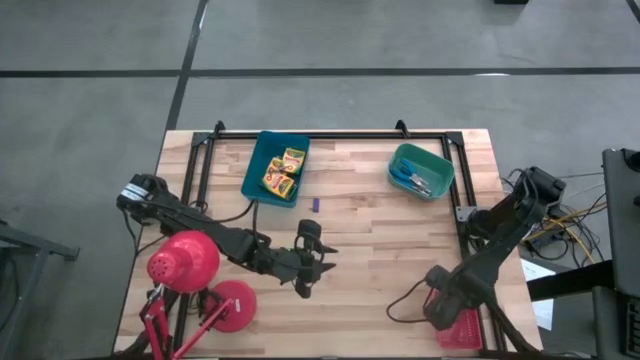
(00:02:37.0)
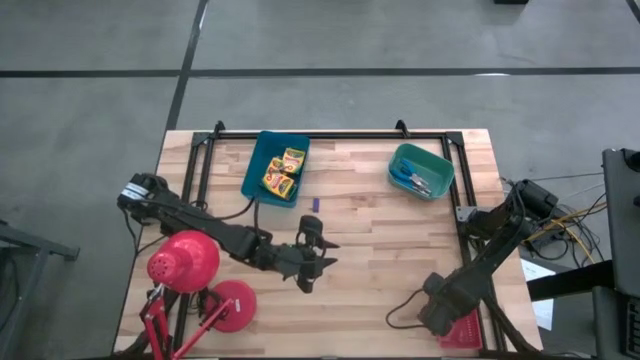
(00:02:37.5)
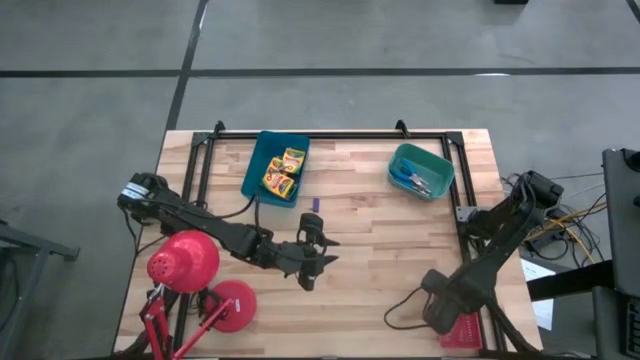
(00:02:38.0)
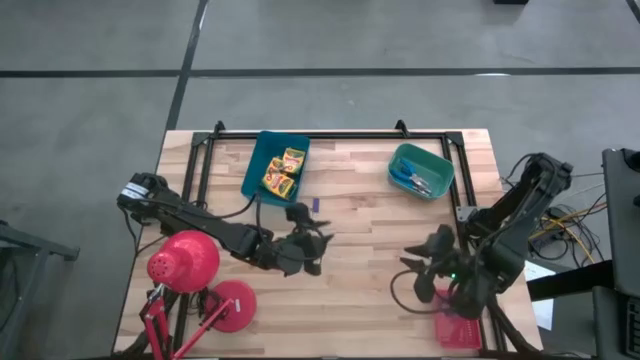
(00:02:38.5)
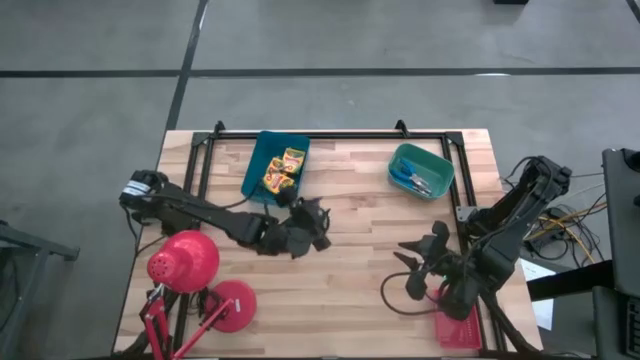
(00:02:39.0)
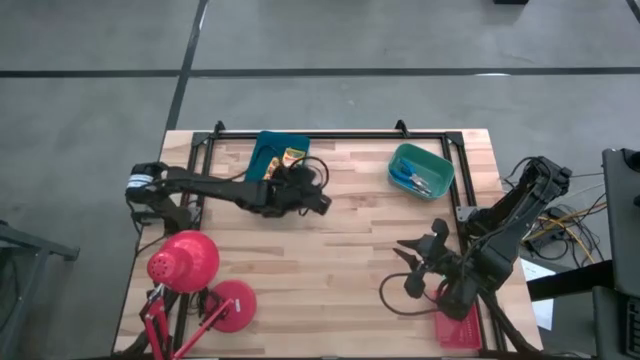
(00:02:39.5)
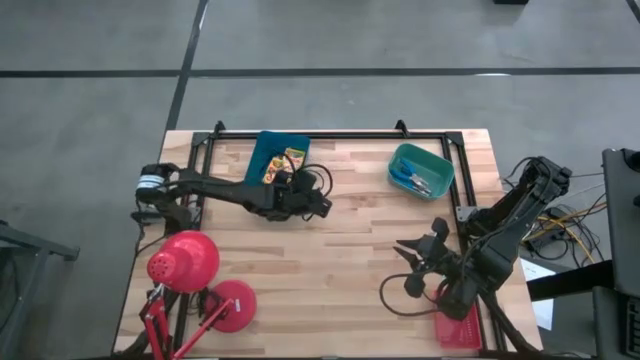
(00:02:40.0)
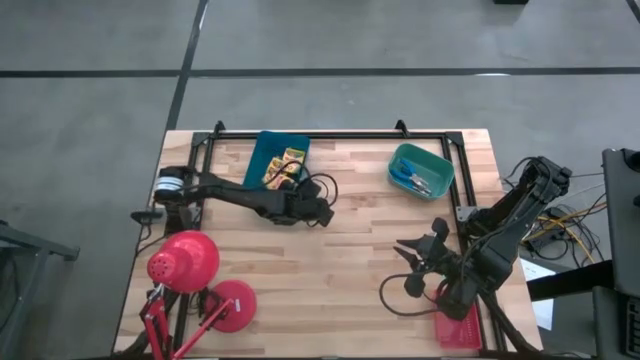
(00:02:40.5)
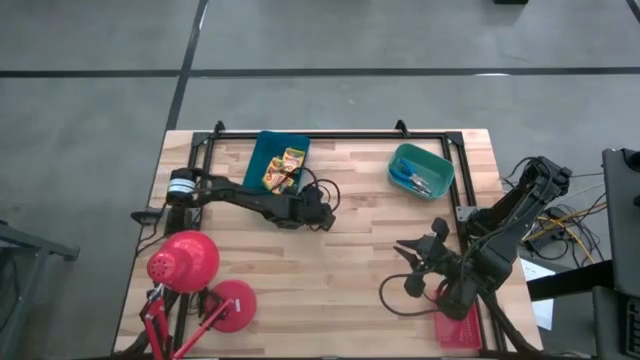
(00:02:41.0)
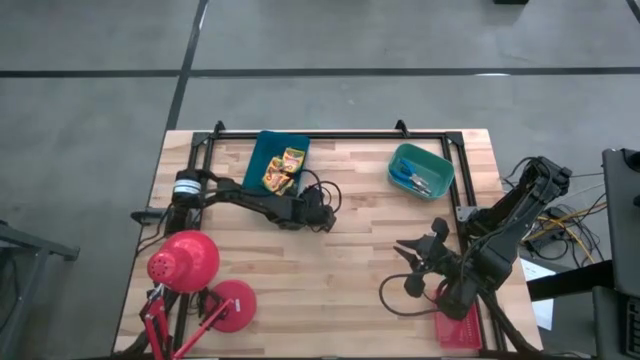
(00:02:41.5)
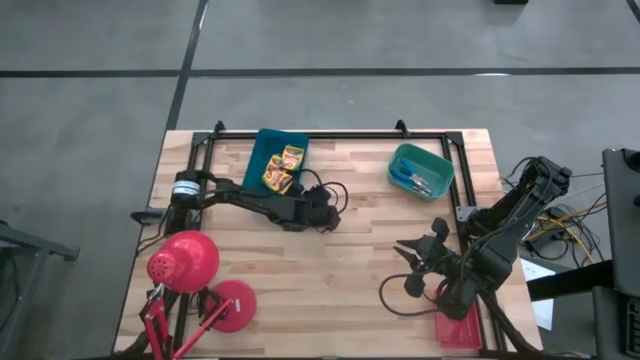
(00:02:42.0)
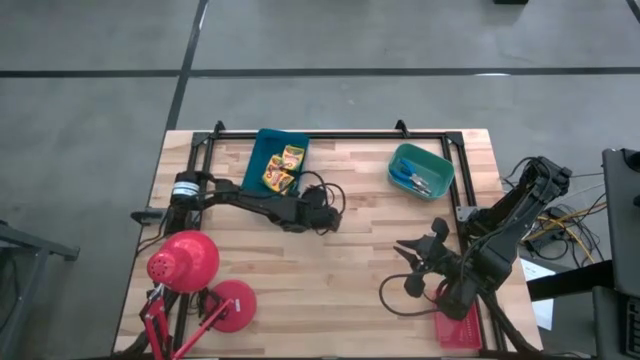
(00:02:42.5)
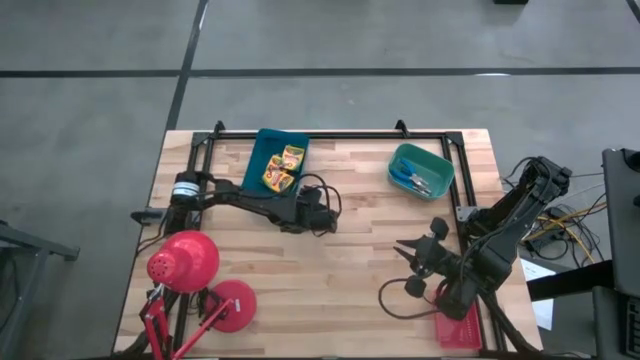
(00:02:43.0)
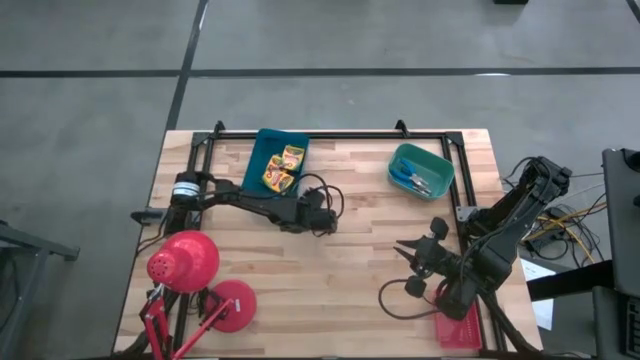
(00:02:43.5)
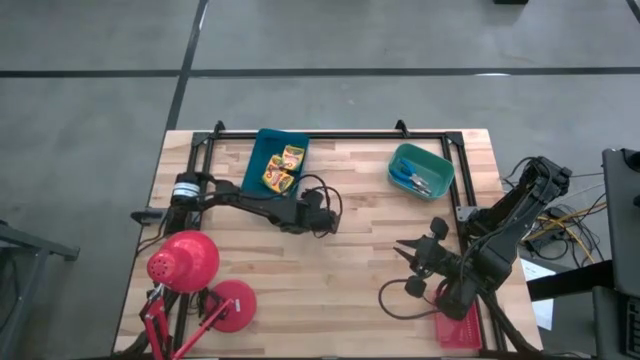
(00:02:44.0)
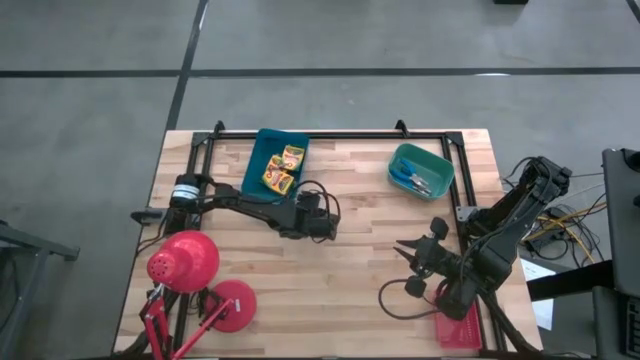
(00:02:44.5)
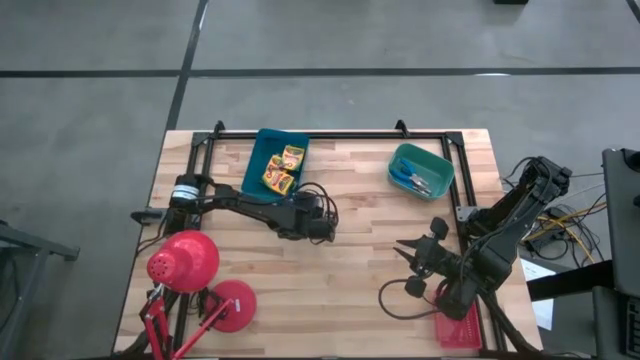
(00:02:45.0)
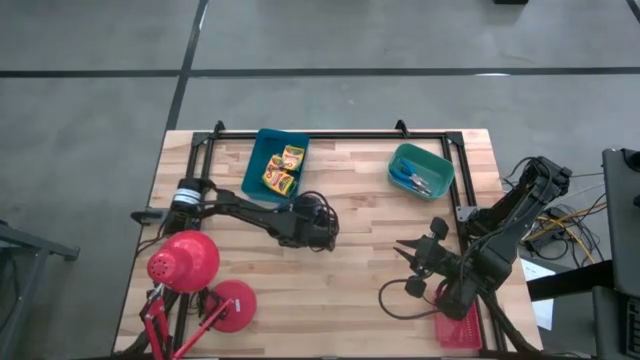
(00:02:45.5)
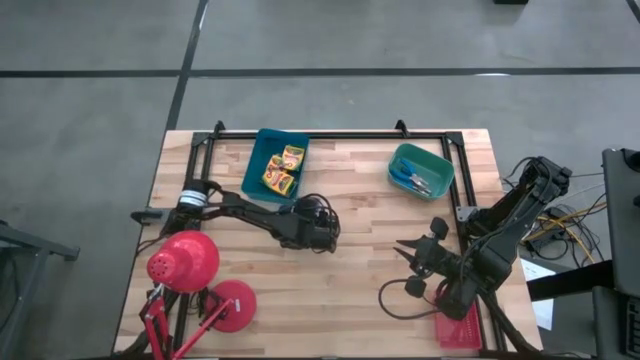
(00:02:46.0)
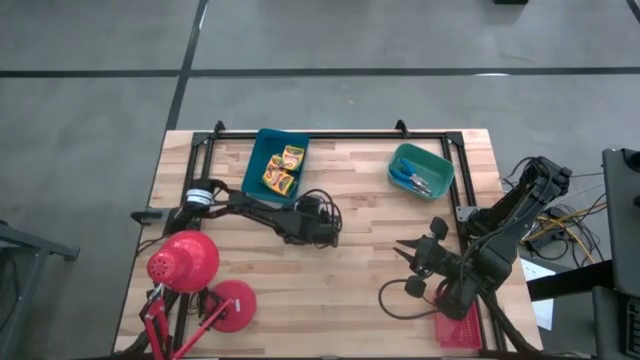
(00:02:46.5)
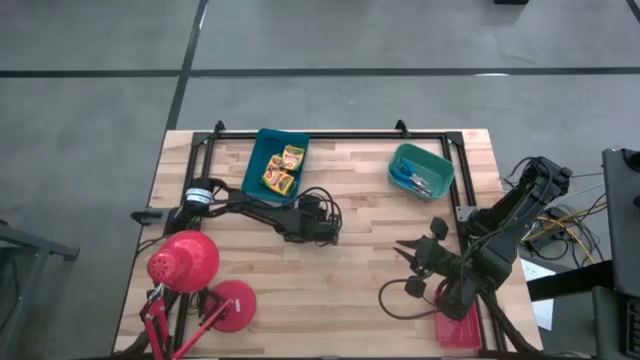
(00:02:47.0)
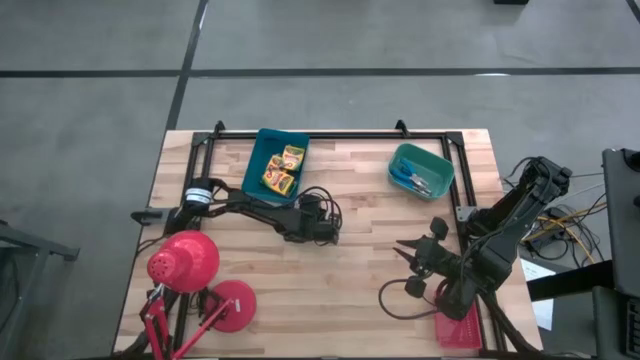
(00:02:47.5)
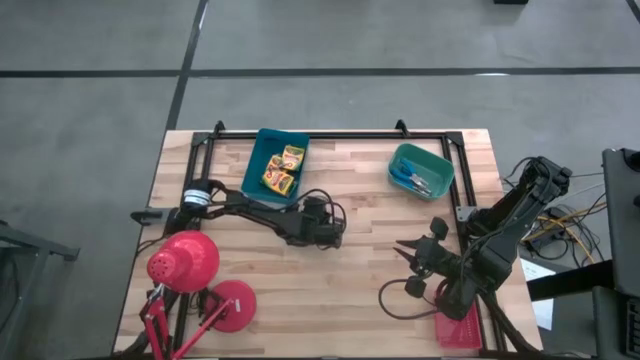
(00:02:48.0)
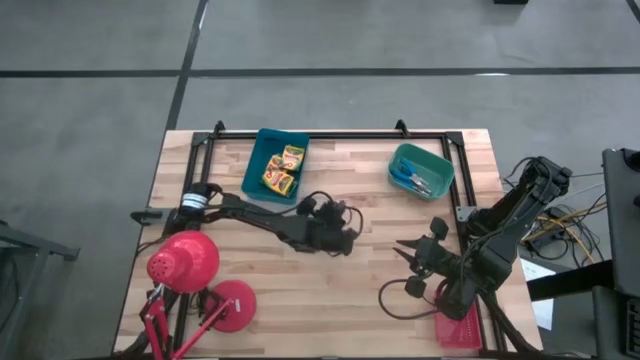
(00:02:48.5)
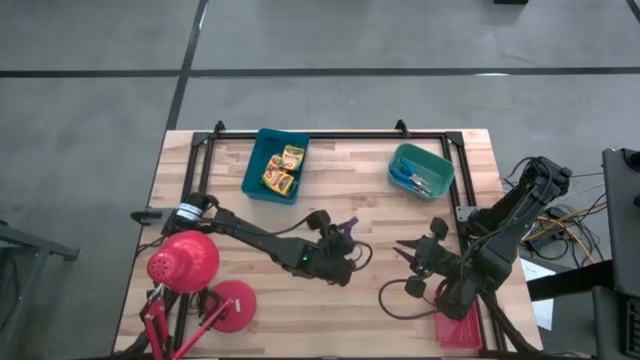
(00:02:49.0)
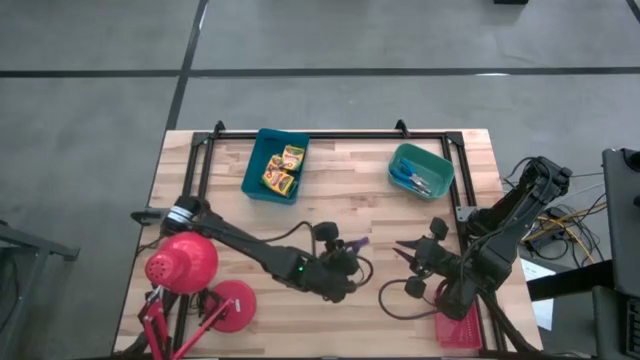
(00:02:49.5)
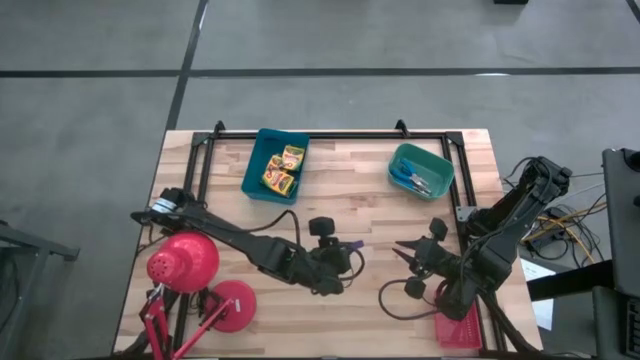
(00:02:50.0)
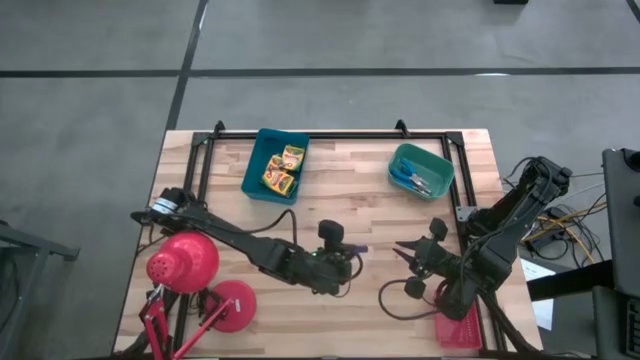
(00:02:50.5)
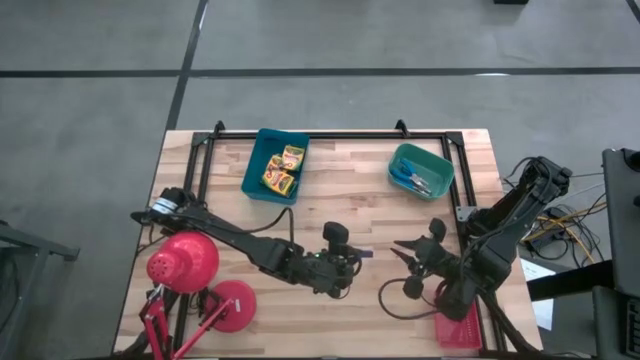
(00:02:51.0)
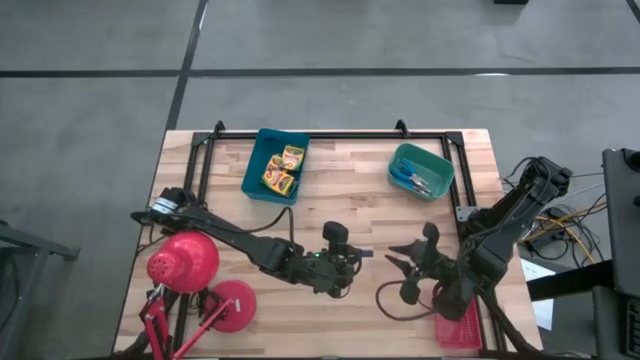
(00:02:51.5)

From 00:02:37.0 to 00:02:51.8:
Task: Pick & Place School Supplies
Put the purple eraser into the red bin

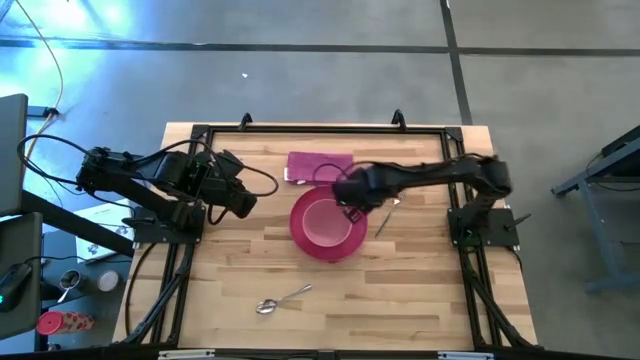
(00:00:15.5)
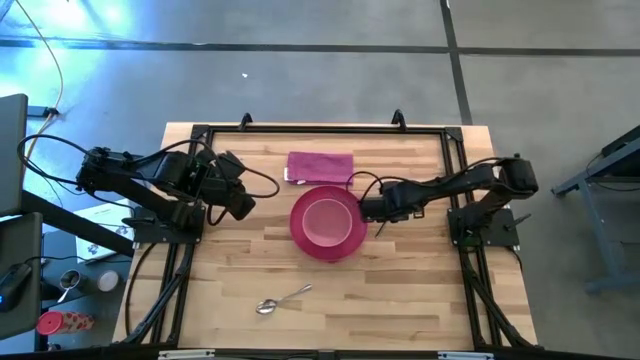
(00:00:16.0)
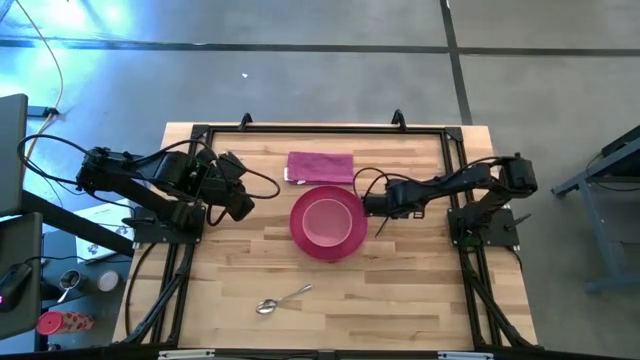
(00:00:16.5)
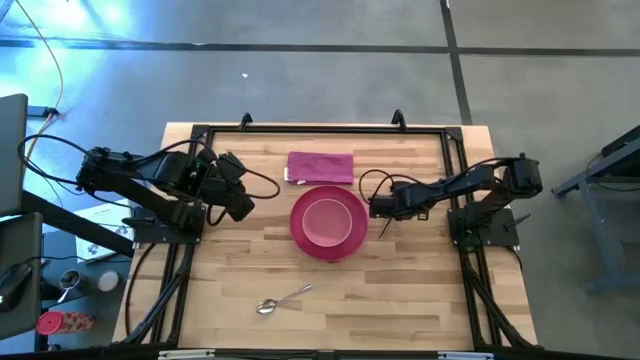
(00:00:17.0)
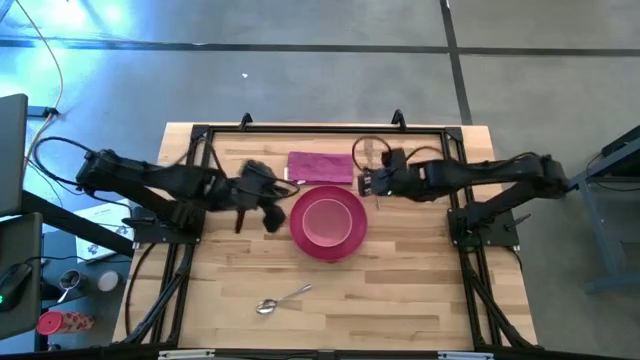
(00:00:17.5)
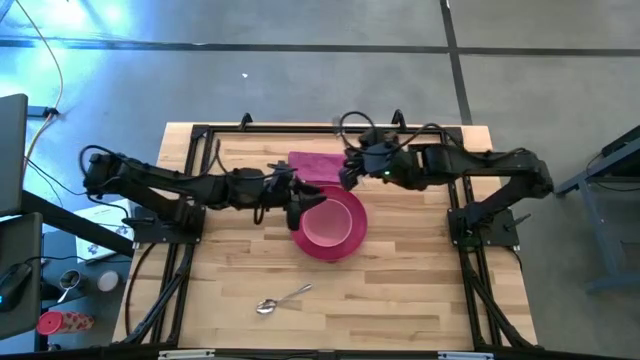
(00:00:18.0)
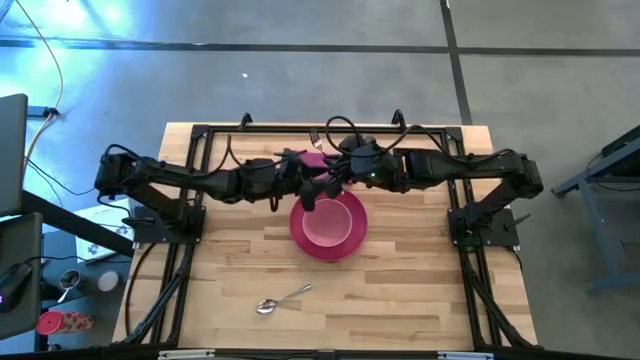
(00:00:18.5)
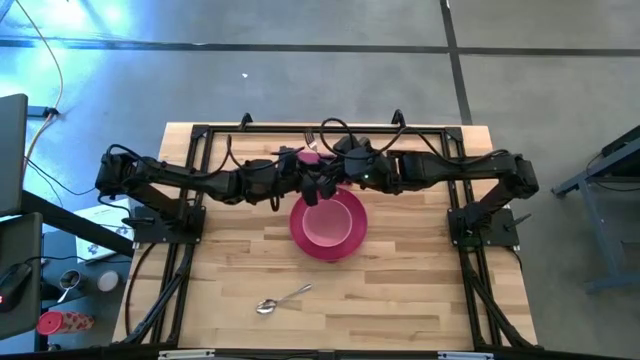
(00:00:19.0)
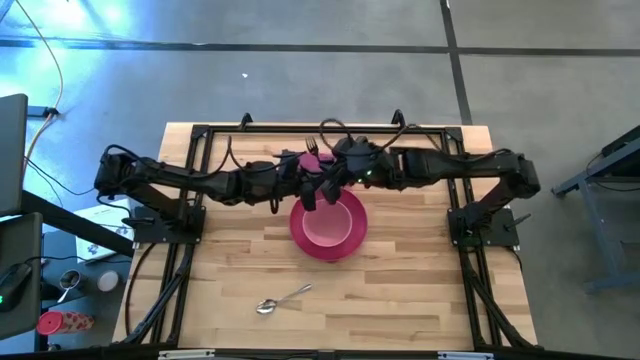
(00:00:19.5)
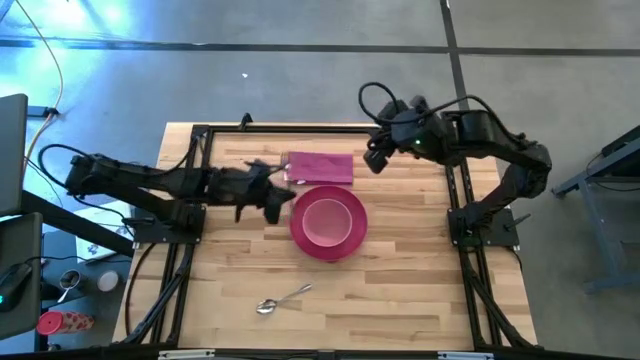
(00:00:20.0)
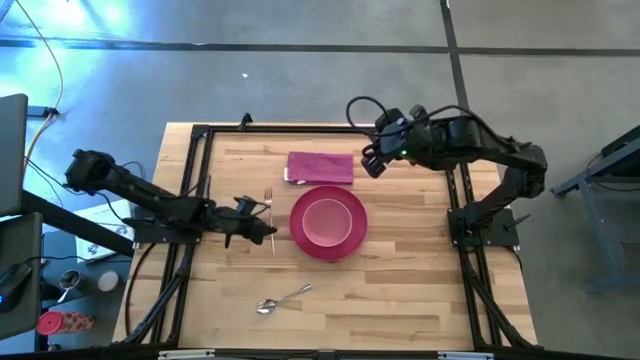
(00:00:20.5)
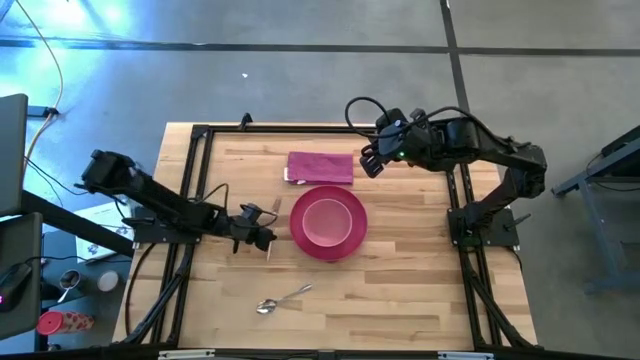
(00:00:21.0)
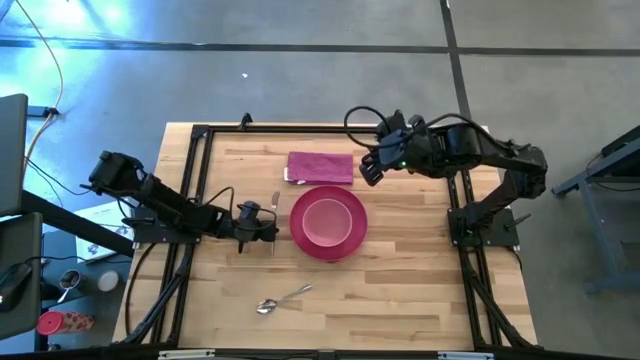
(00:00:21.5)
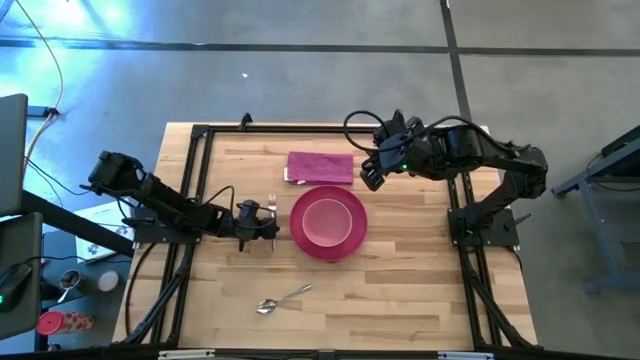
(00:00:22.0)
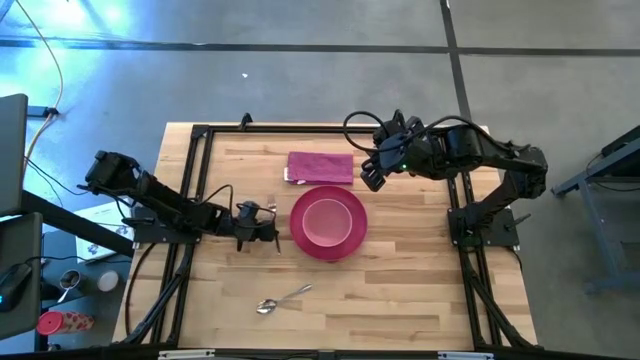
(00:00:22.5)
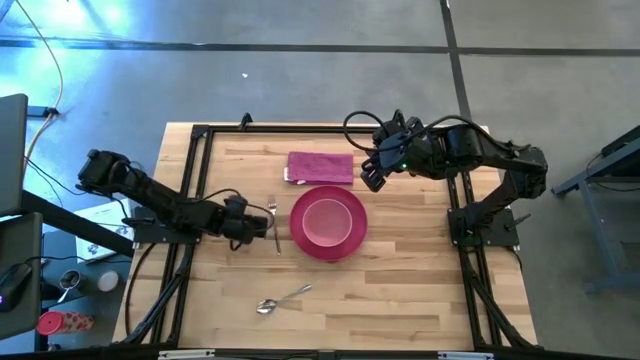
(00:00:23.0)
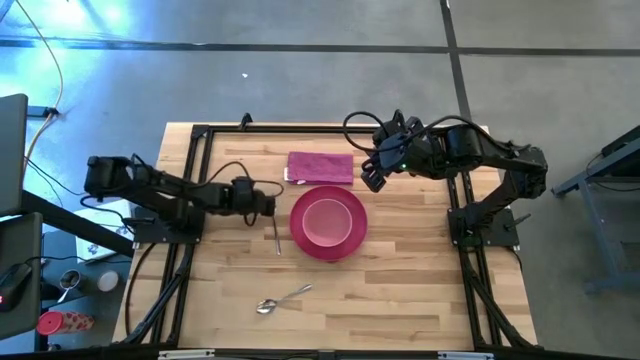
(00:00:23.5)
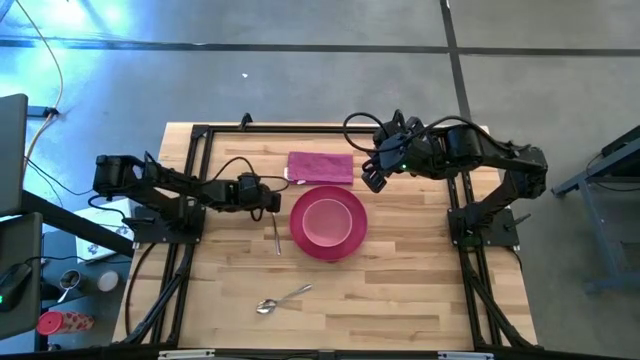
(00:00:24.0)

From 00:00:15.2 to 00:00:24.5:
Task: Set table place
Put the silver fork on the left side of the red plate
